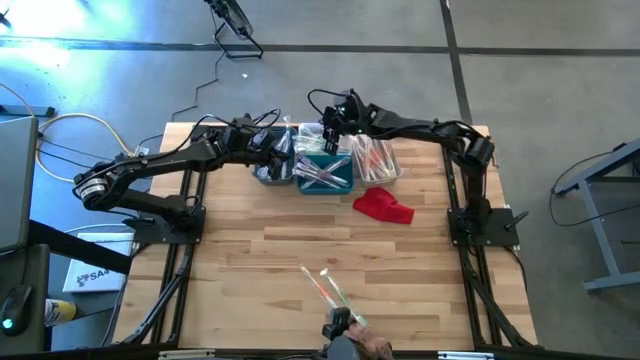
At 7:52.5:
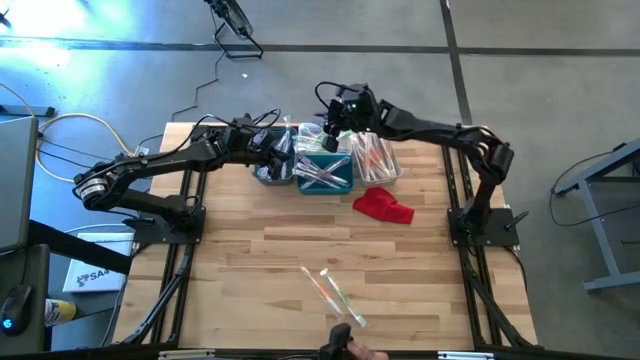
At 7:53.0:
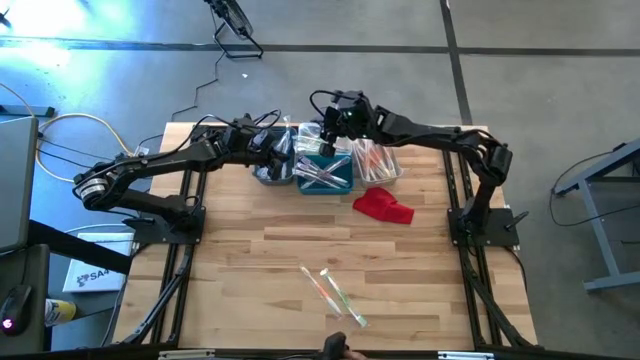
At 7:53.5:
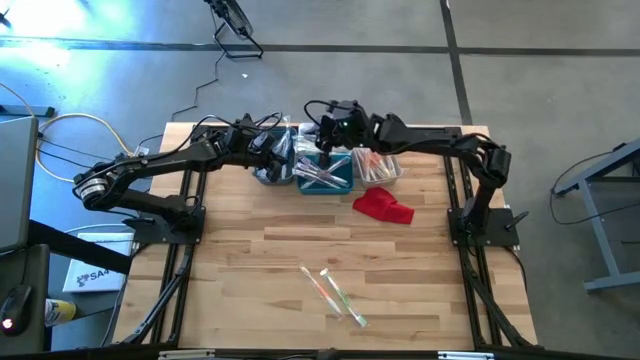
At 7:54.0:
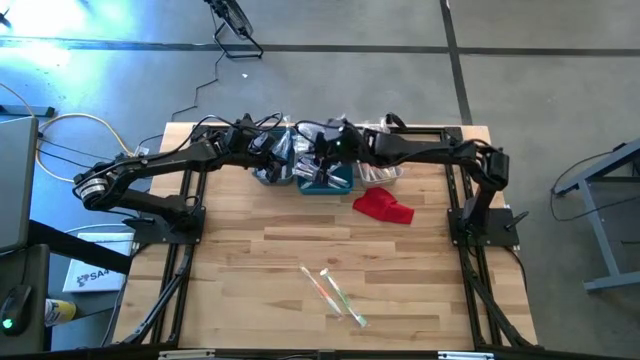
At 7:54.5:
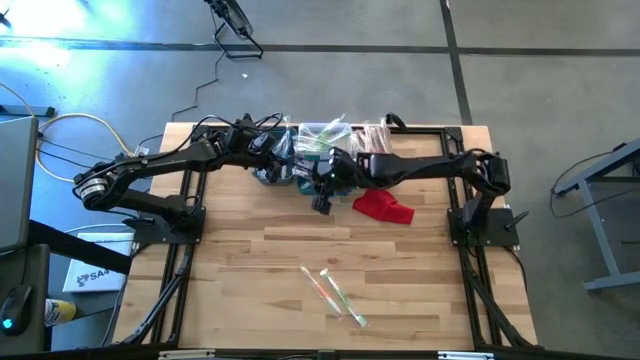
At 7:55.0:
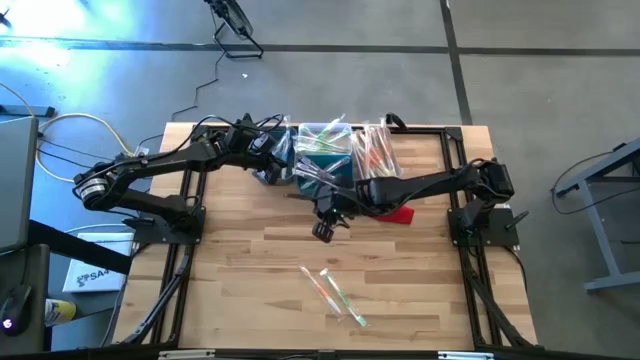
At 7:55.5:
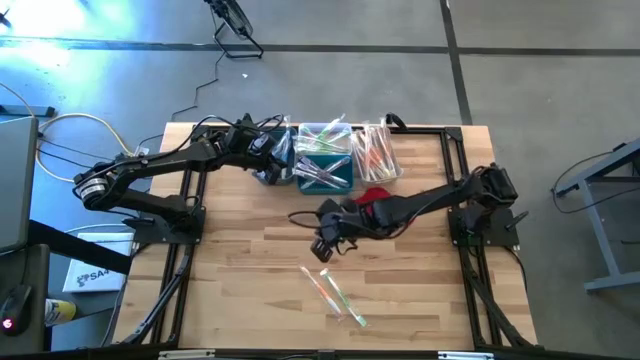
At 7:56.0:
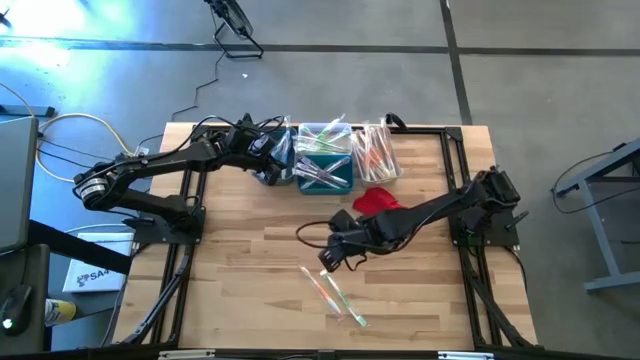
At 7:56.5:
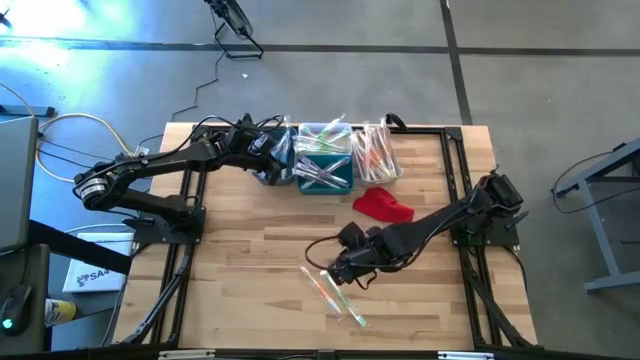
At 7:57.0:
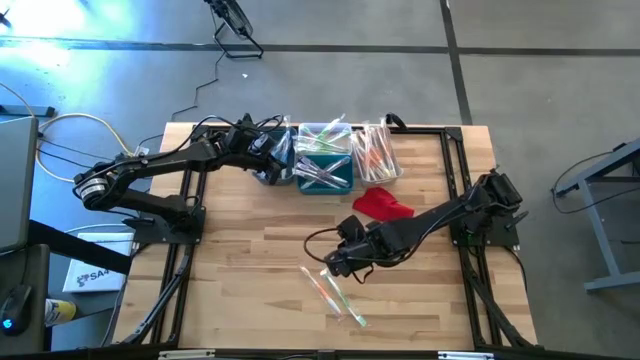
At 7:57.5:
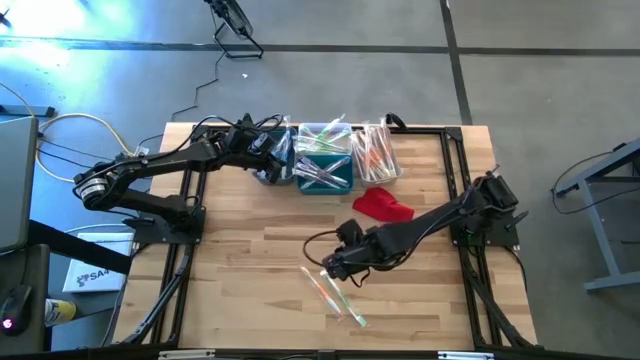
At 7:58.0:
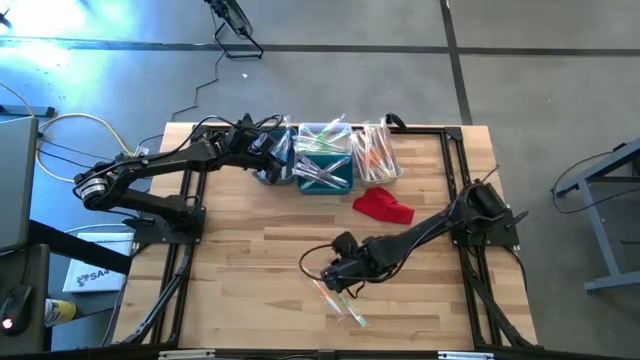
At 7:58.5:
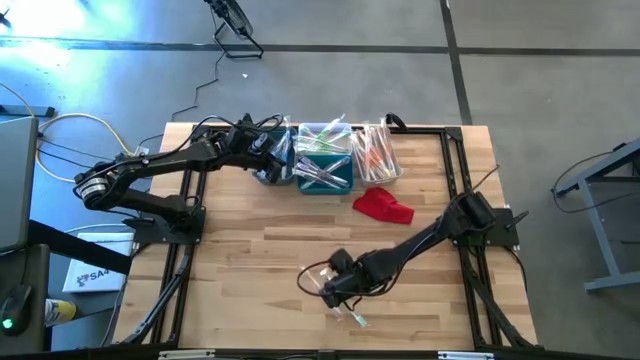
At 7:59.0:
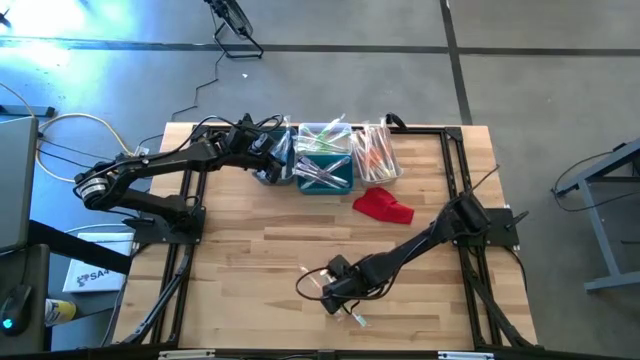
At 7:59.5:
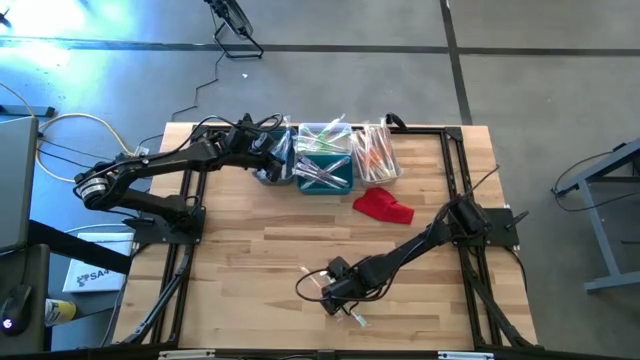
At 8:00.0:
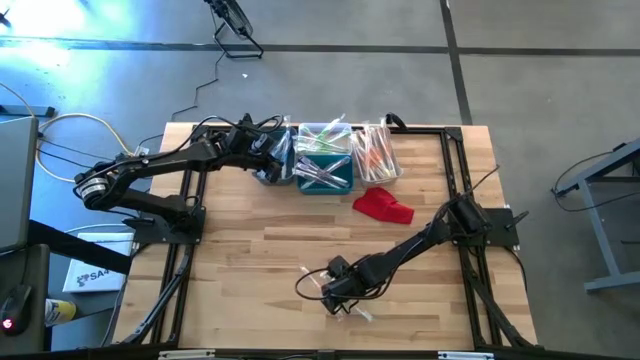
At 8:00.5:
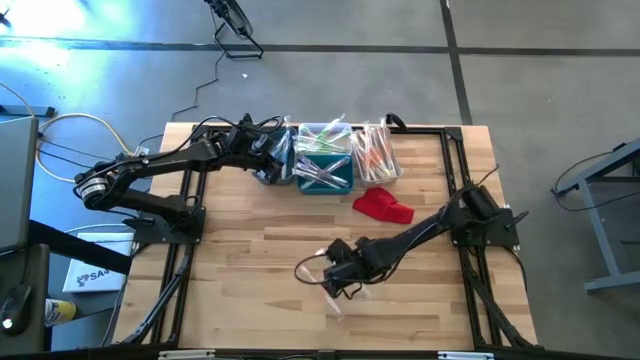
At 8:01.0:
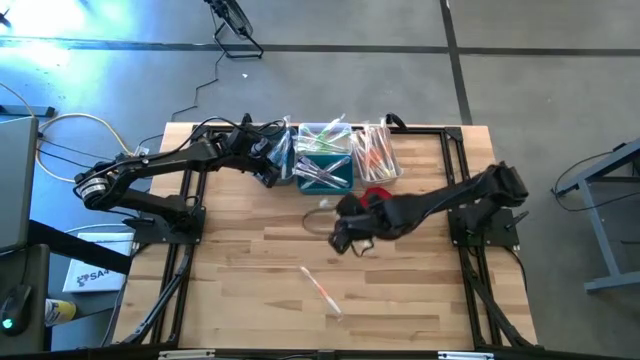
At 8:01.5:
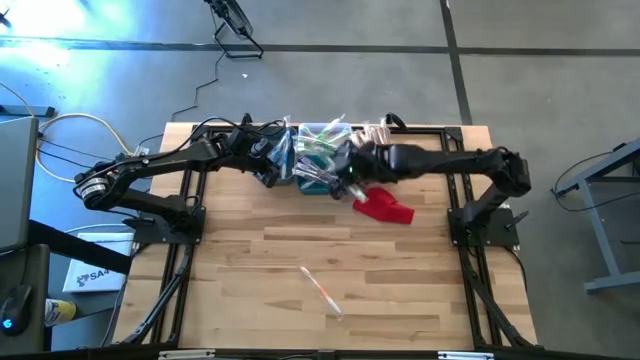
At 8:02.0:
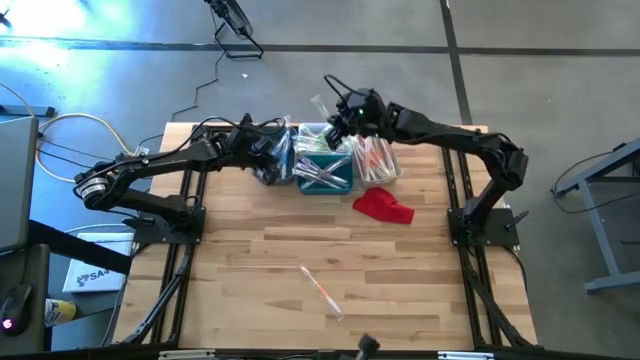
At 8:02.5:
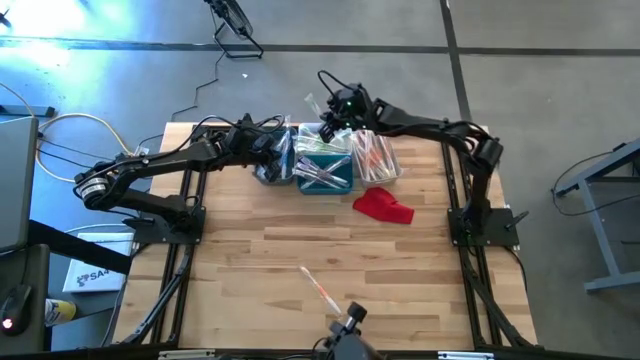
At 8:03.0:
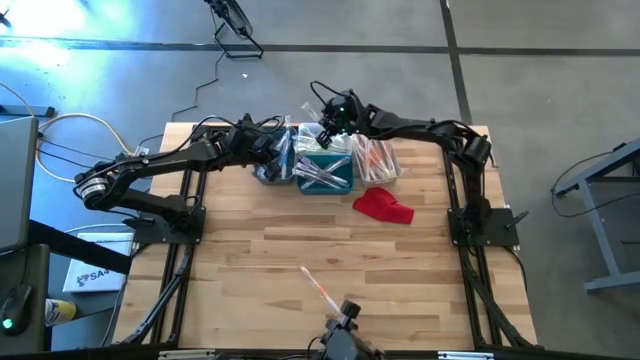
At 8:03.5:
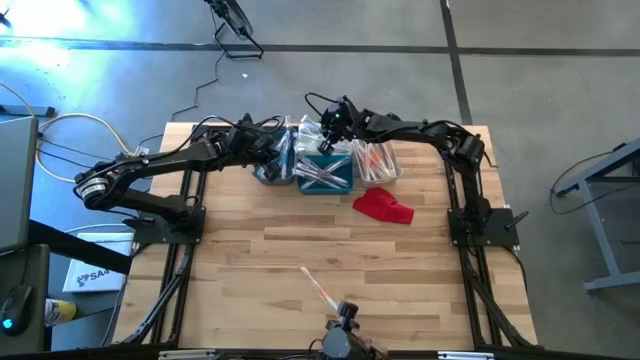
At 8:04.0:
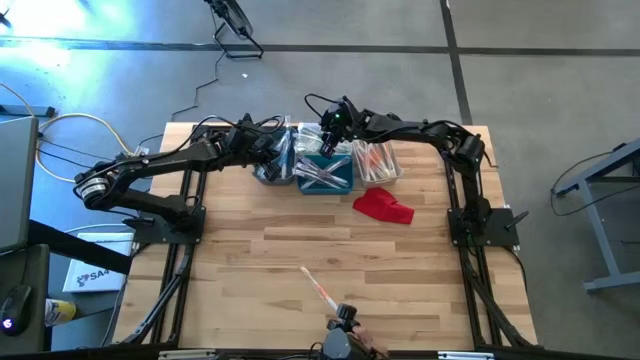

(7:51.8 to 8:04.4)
Task: Pick & Place Toothbrushes
Put the green toothbrush into the transparent bin

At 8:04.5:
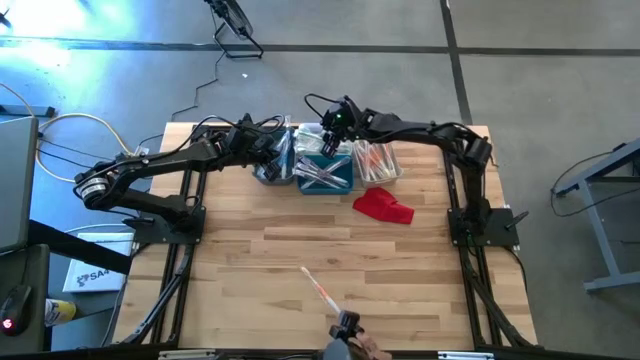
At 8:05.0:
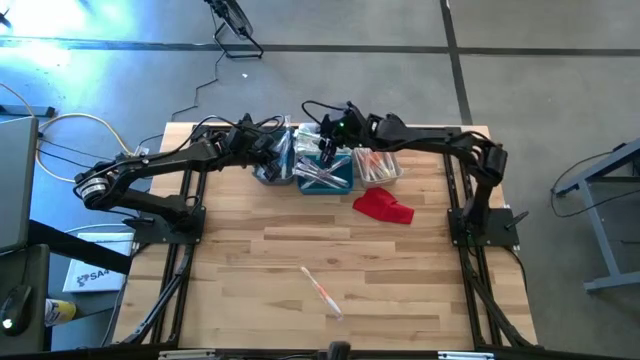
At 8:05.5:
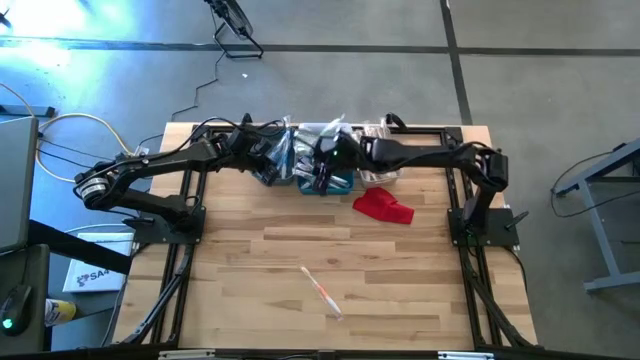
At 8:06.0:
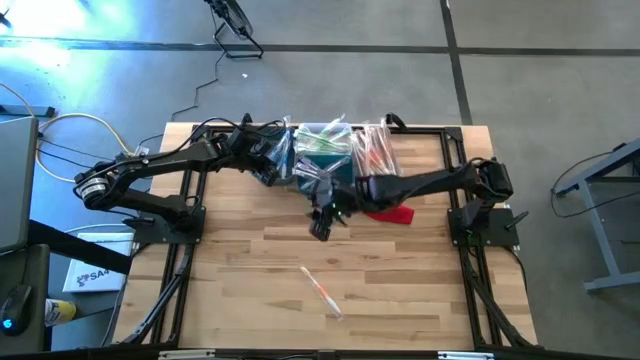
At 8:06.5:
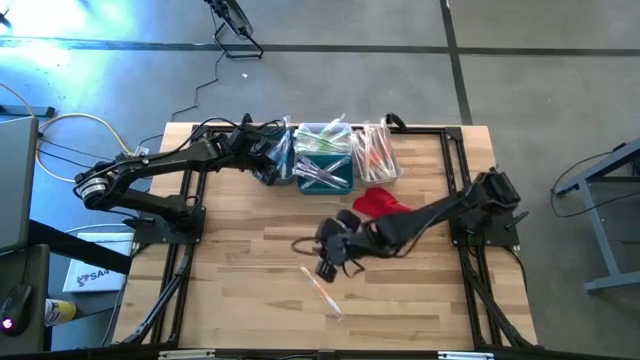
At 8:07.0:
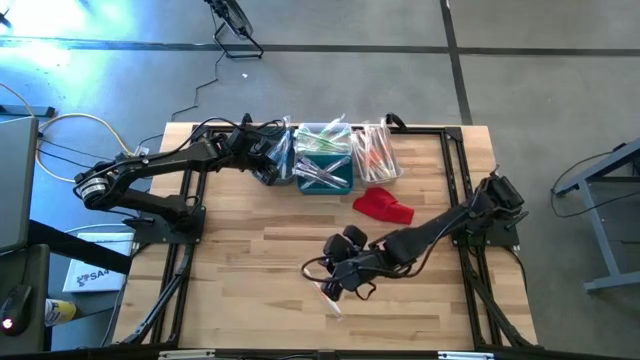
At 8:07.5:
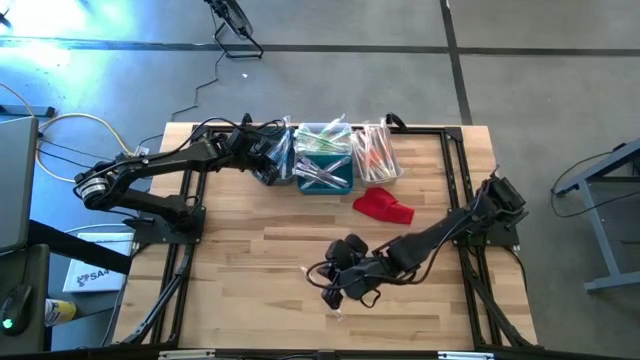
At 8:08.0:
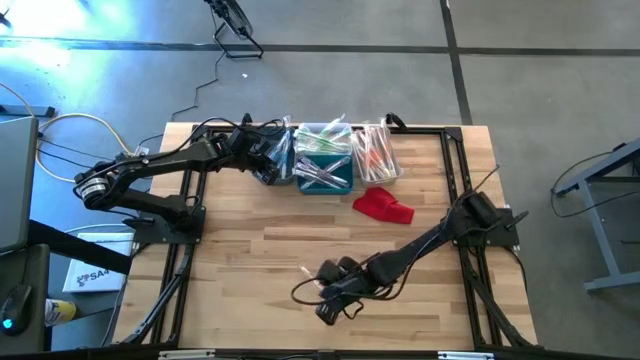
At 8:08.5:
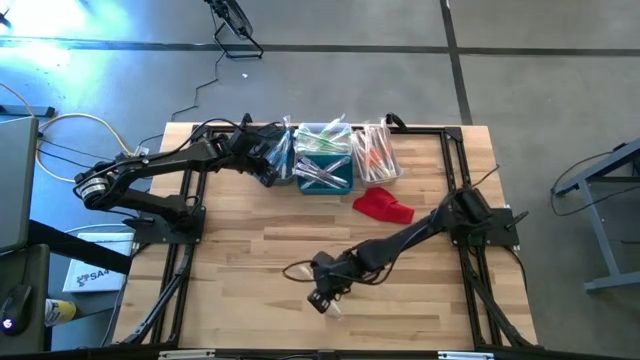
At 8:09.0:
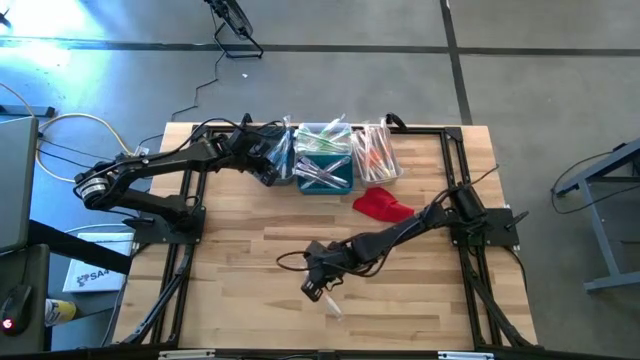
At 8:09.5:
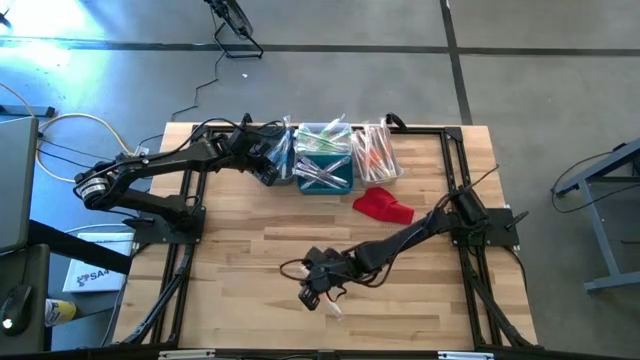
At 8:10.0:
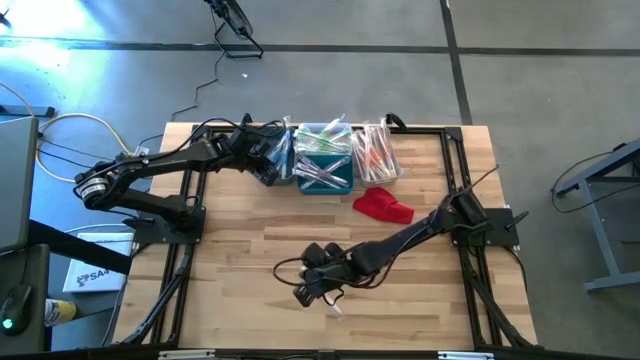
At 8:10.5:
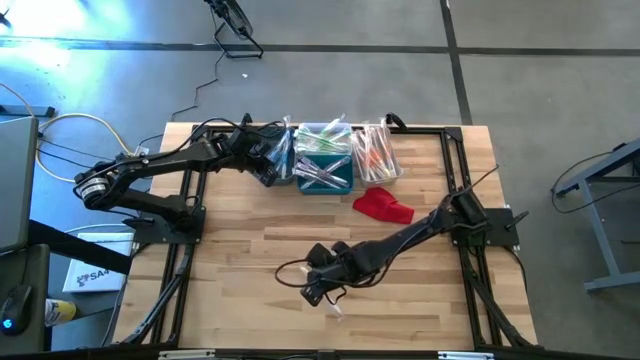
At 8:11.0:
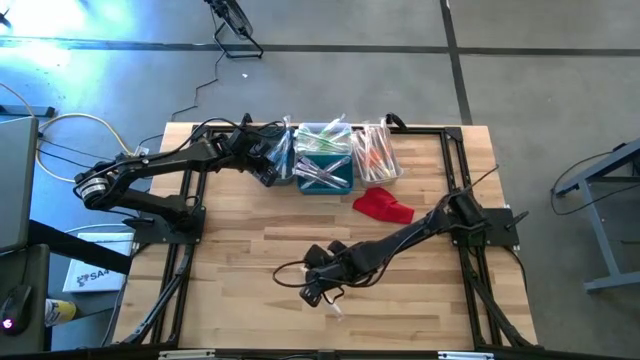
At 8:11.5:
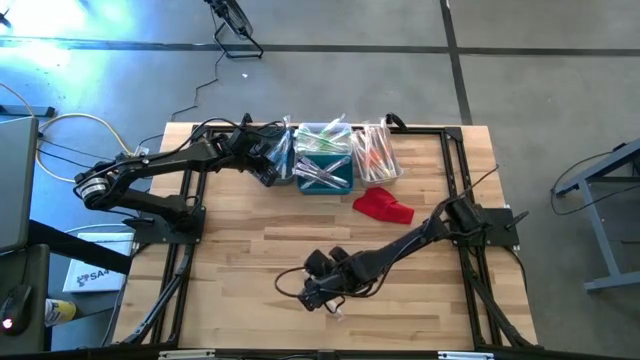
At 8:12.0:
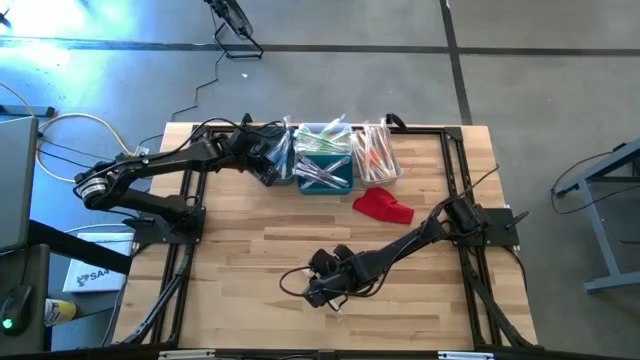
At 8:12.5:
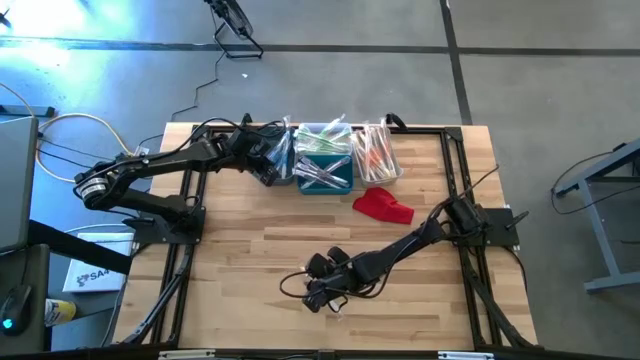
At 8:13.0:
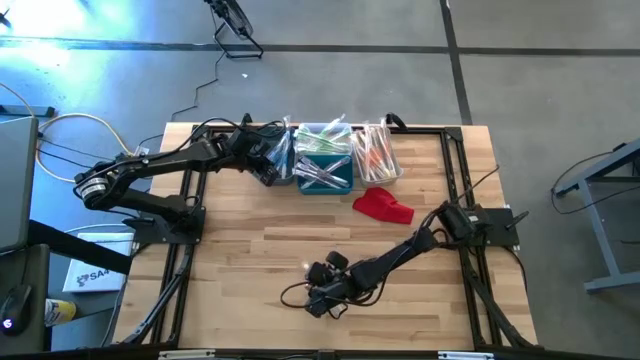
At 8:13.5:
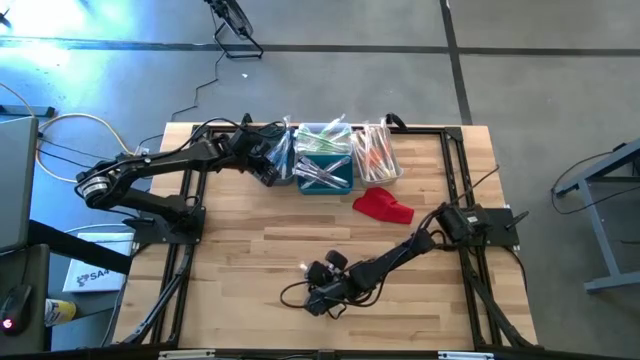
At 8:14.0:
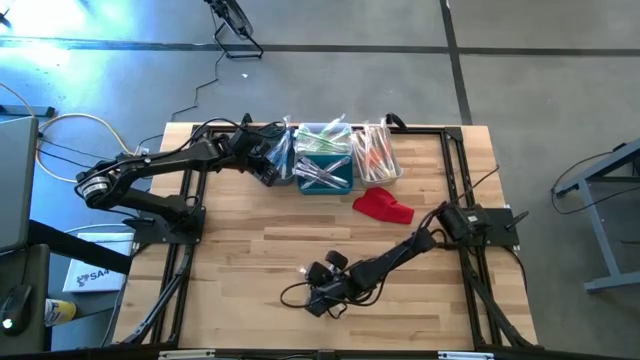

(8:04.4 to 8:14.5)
Put the orange toothbrush into the white bin
